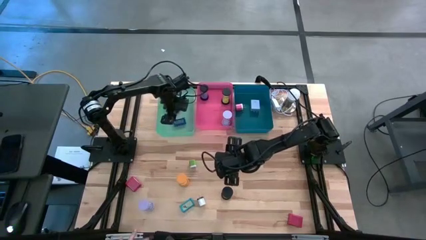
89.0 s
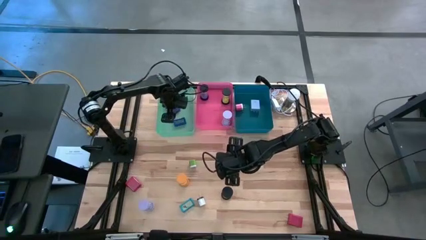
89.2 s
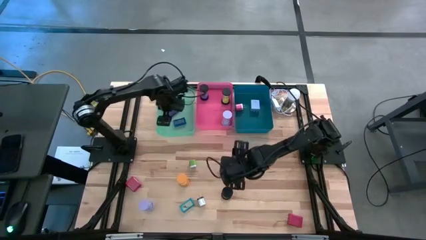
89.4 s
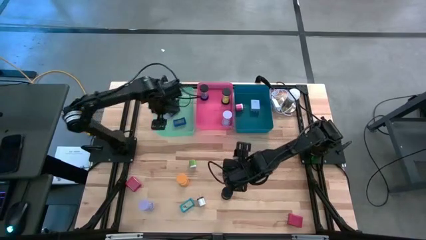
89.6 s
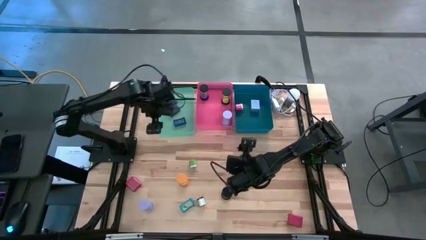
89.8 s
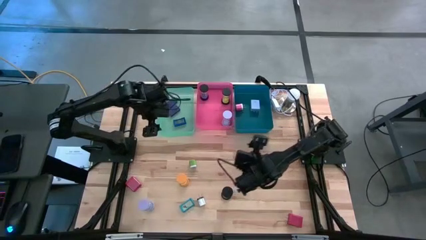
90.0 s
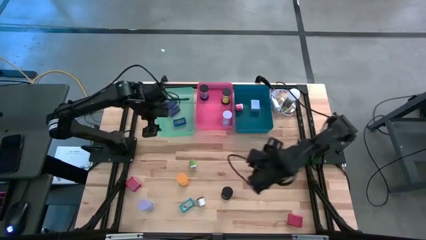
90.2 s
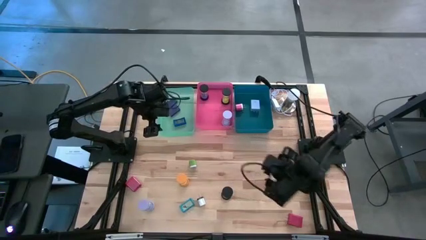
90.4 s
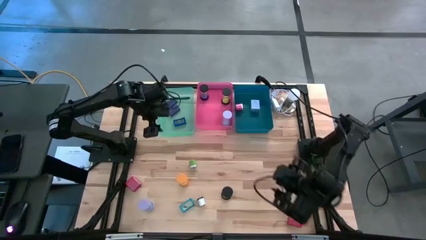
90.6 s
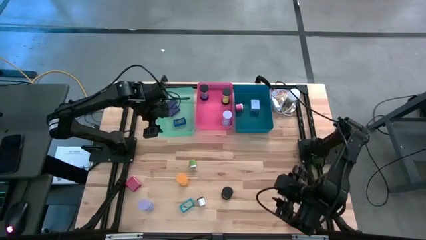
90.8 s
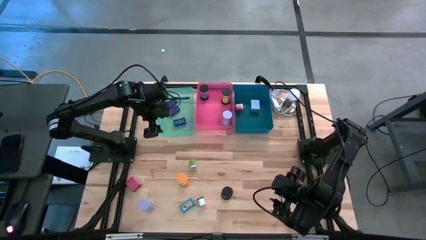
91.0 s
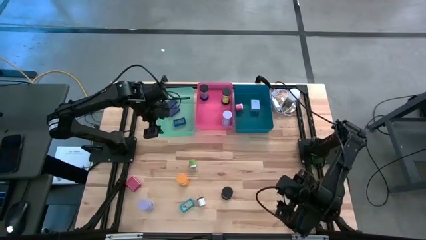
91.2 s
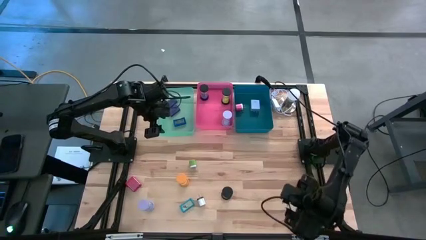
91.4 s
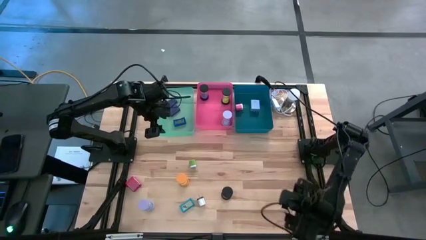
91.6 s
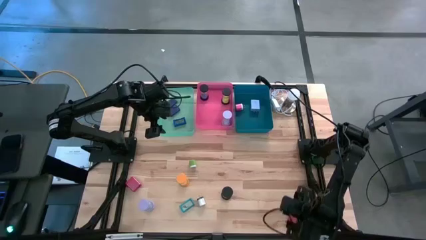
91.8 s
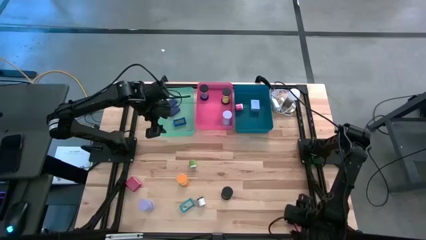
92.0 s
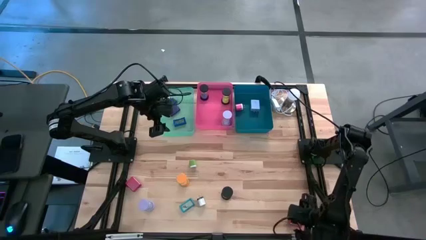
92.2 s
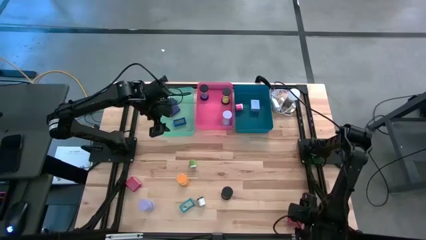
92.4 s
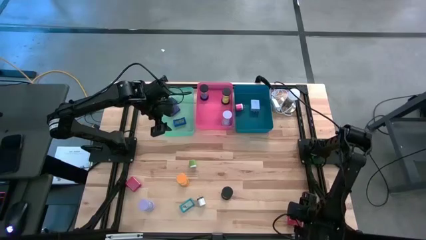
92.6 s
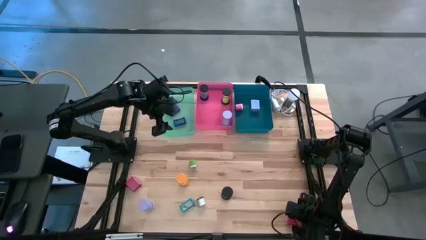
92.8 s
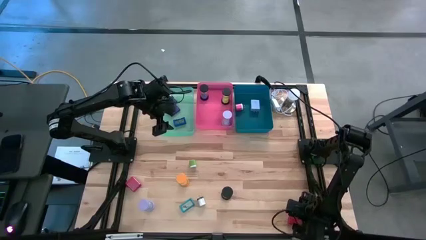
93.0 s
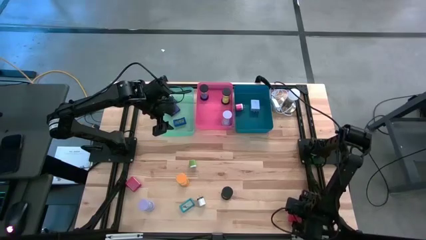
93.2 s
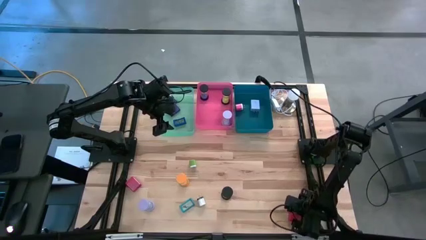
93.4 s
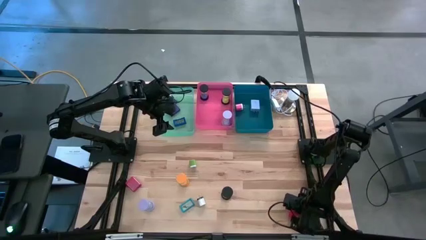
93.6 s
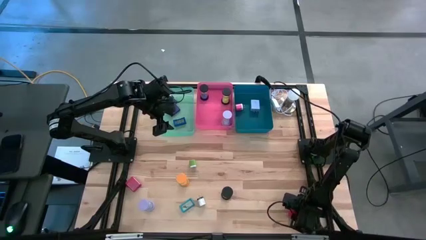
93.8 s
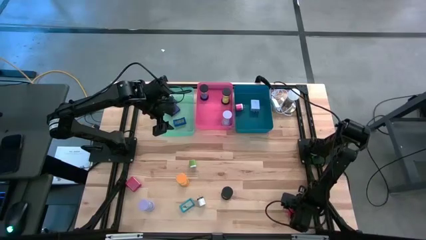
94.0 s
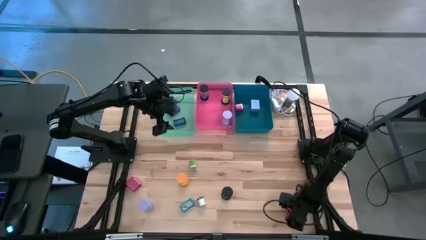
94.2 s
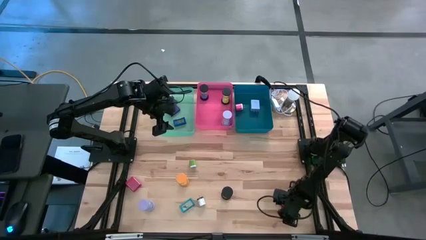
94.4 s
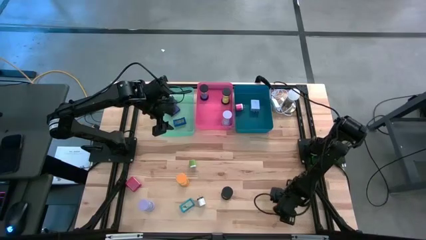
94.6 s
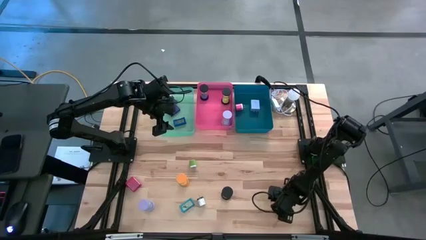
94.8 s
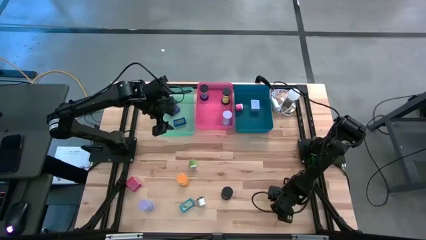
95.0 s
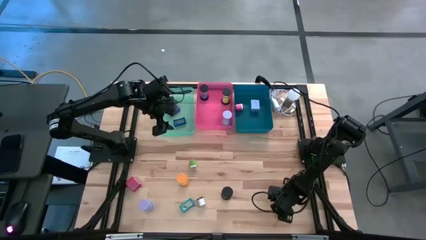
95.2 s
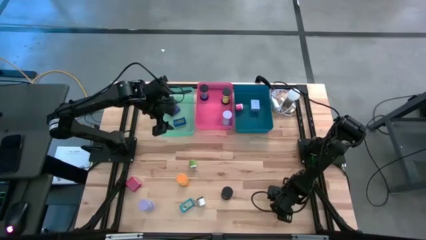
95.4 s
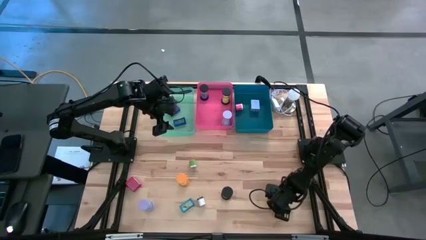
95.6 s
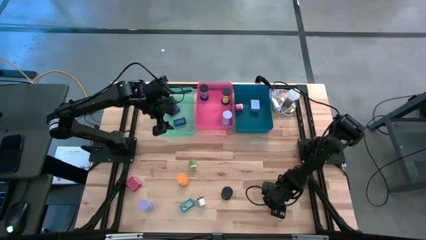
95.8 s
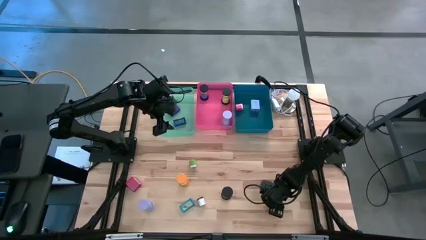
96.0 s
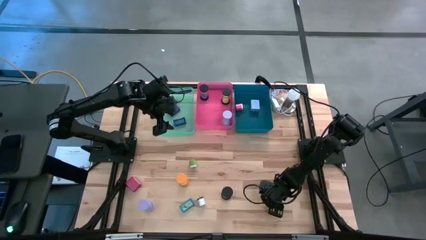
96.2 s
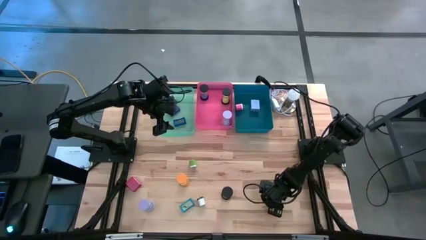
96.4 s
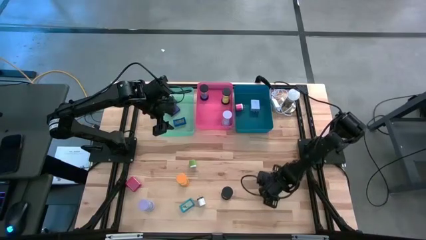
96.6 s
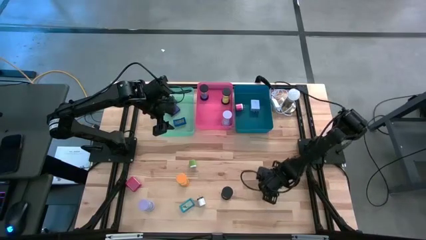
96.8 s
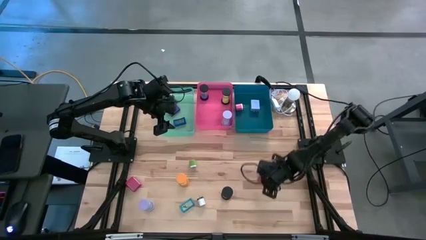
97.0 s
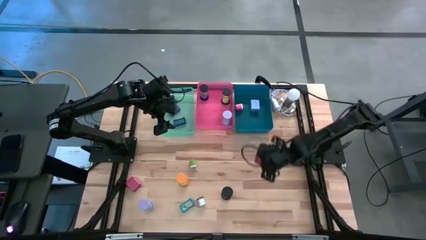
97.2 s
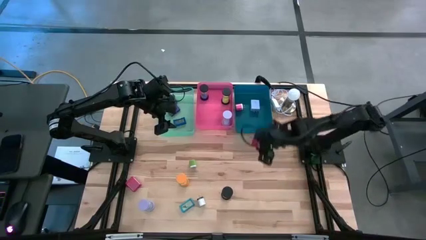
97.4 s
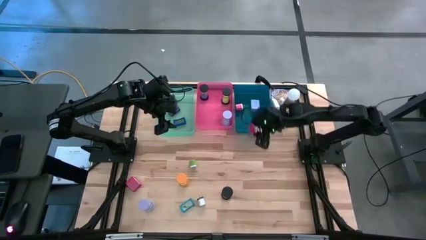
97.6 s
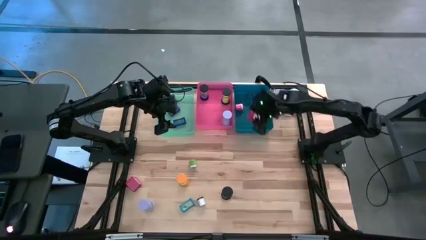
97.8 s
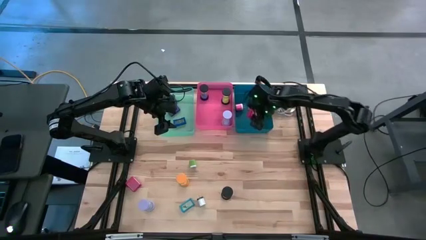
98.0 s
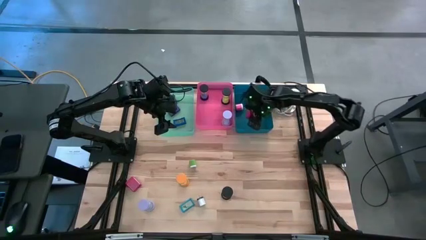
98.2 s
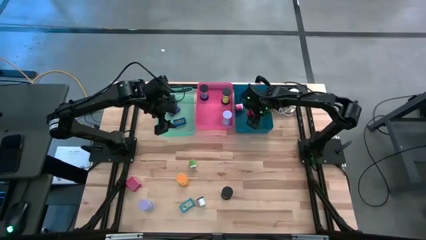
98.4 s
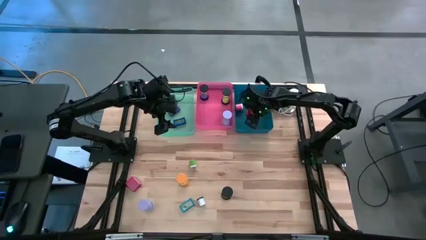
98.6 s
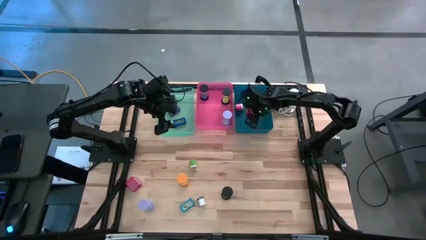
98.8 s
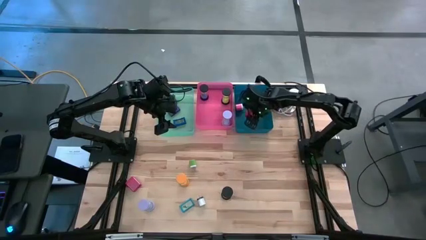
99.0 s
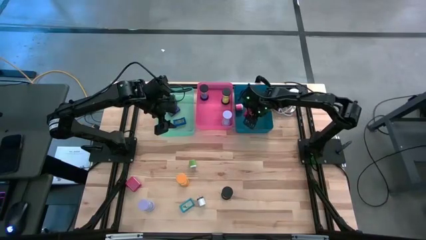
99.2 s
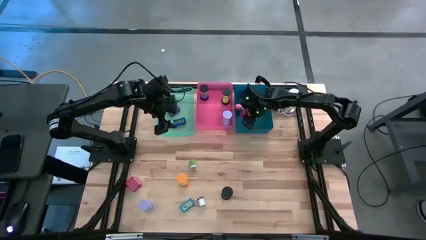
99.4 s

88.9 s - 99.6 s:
Task: Pick & Place Office items
Put the right red charger adapter into the blue bin
